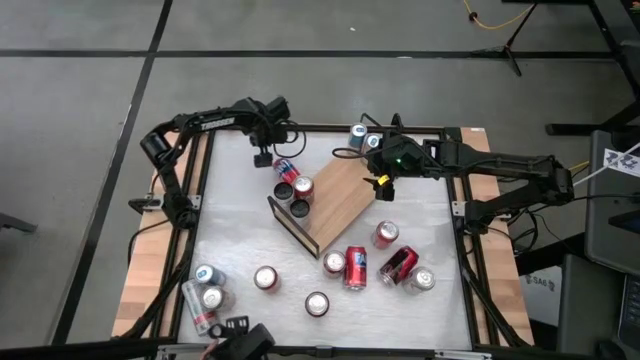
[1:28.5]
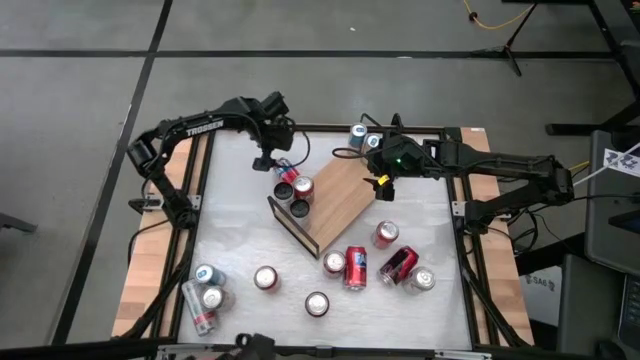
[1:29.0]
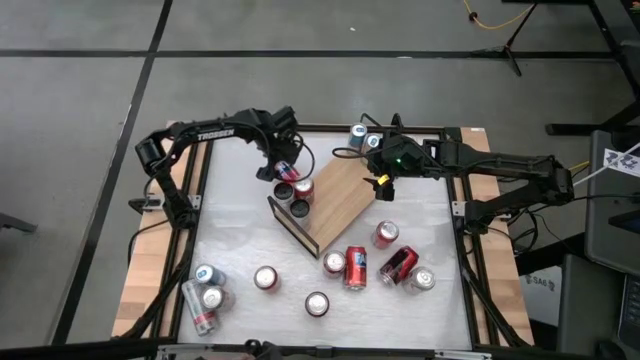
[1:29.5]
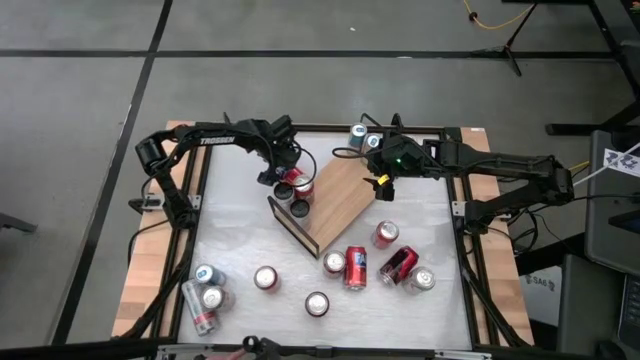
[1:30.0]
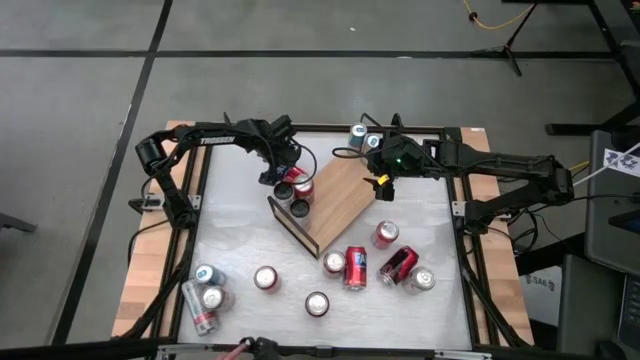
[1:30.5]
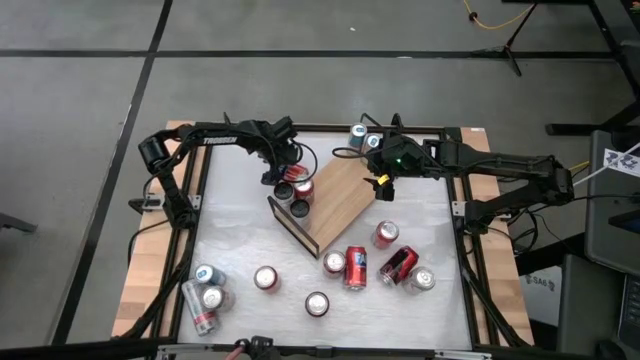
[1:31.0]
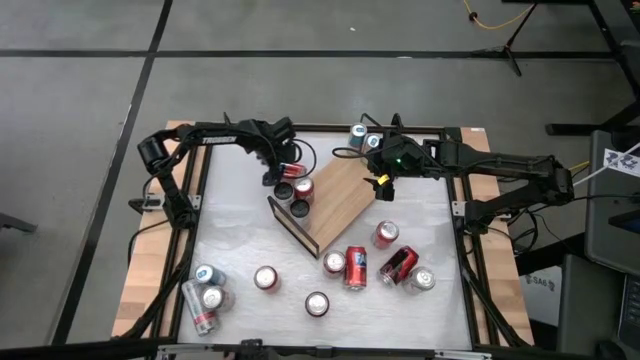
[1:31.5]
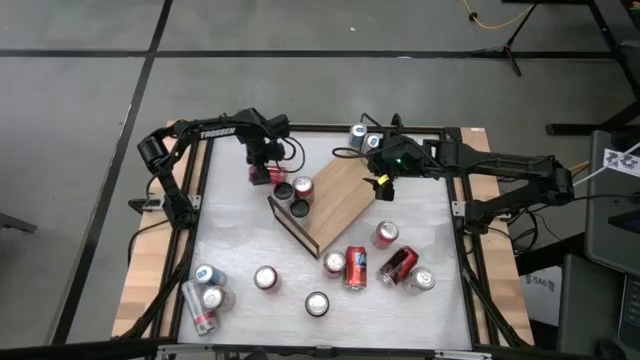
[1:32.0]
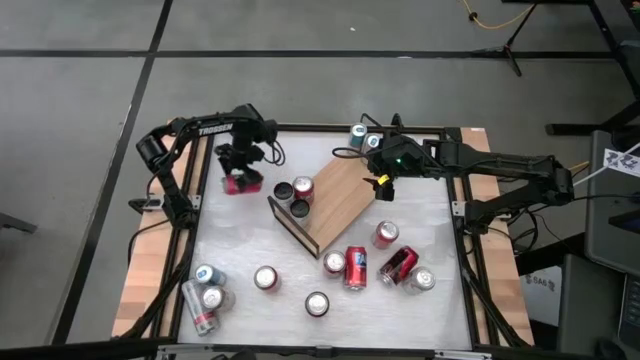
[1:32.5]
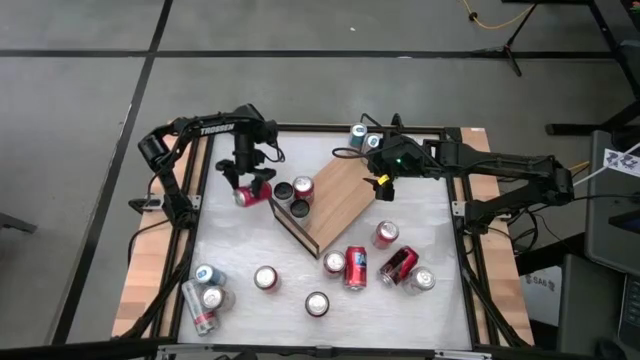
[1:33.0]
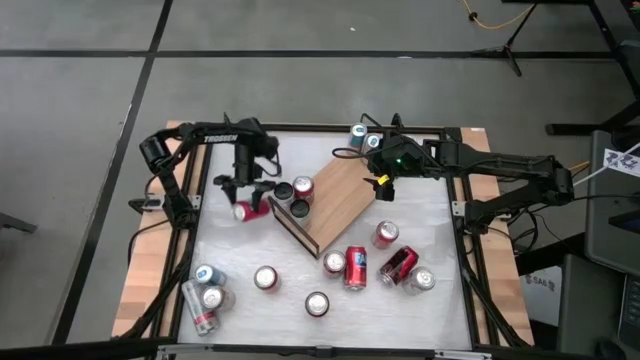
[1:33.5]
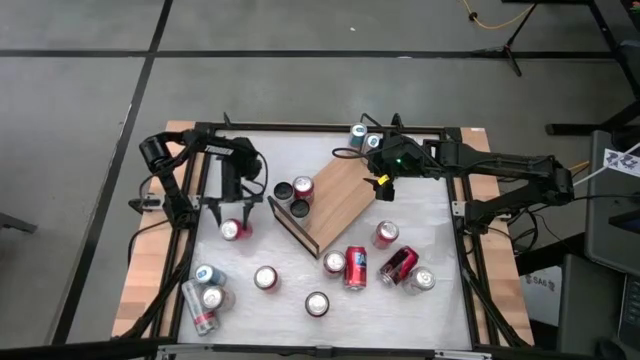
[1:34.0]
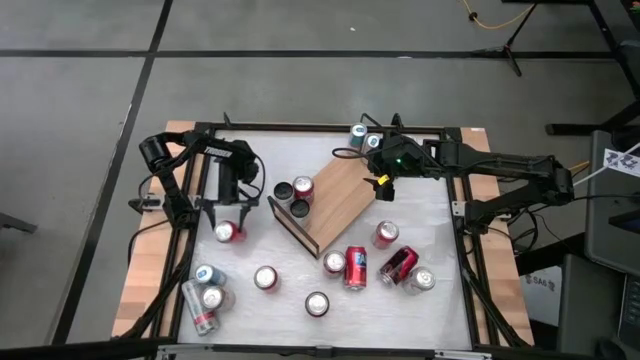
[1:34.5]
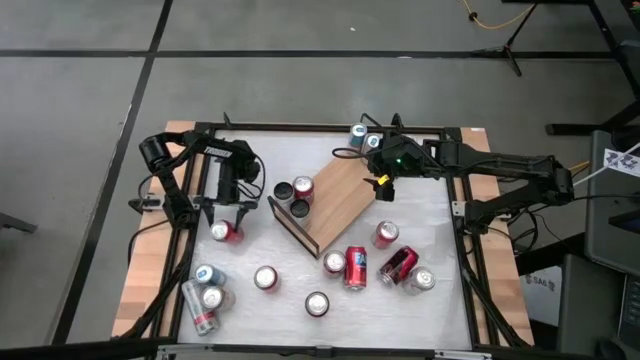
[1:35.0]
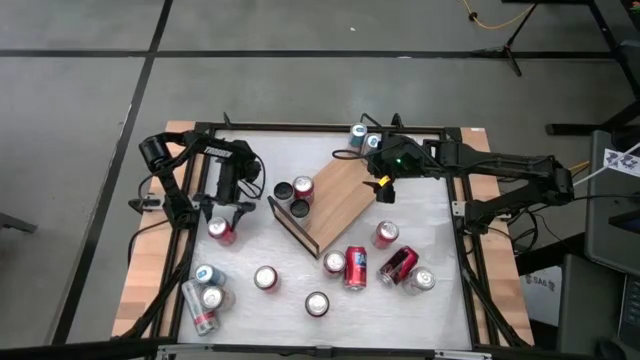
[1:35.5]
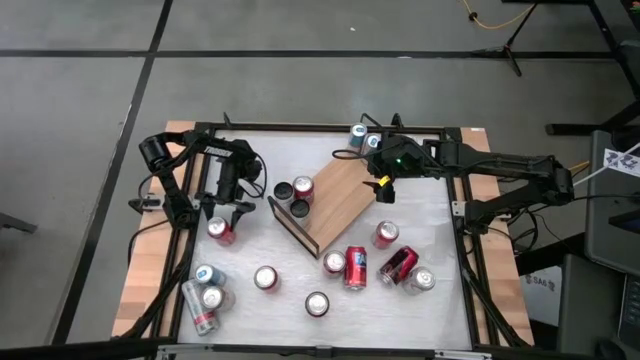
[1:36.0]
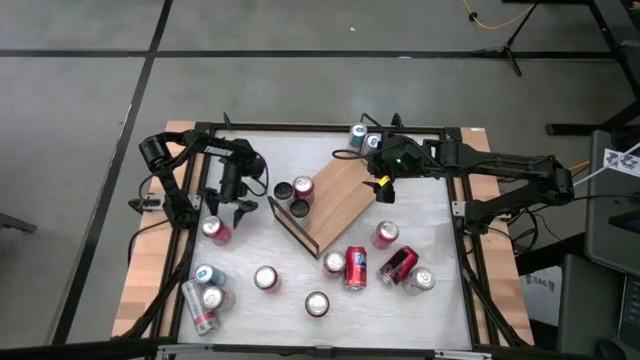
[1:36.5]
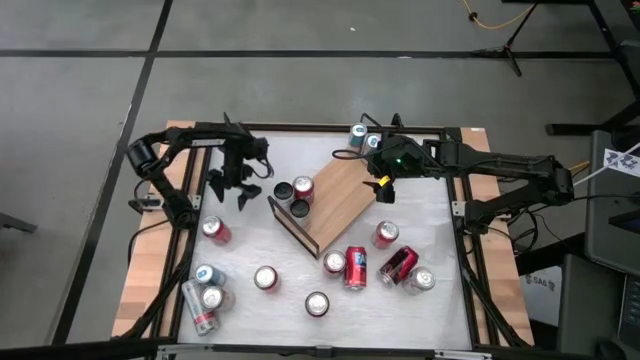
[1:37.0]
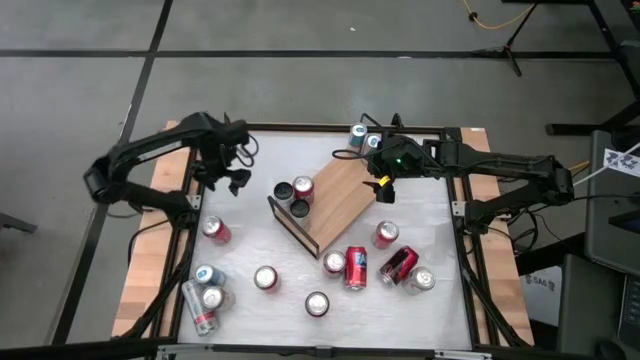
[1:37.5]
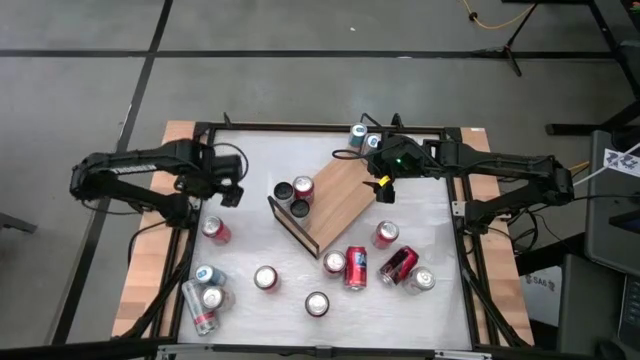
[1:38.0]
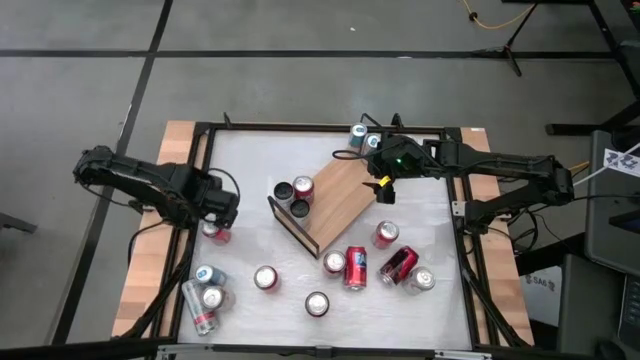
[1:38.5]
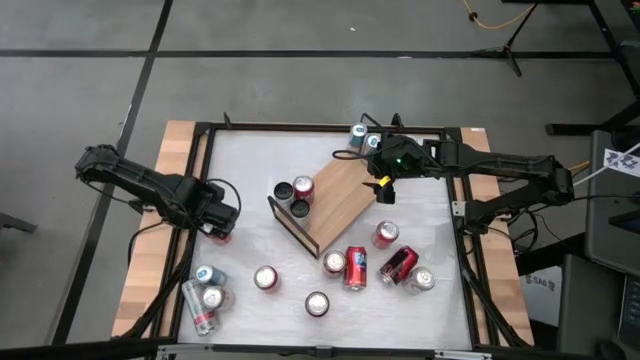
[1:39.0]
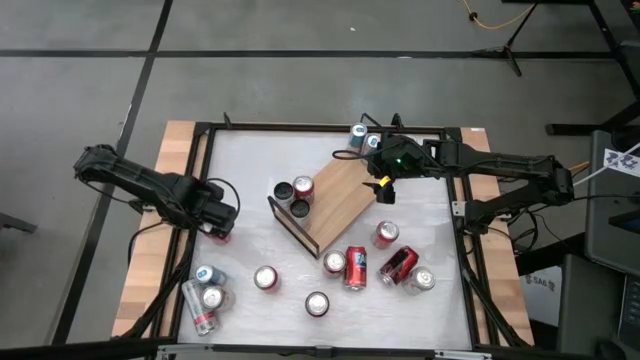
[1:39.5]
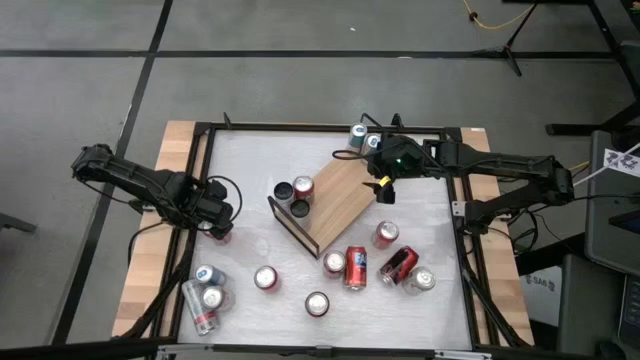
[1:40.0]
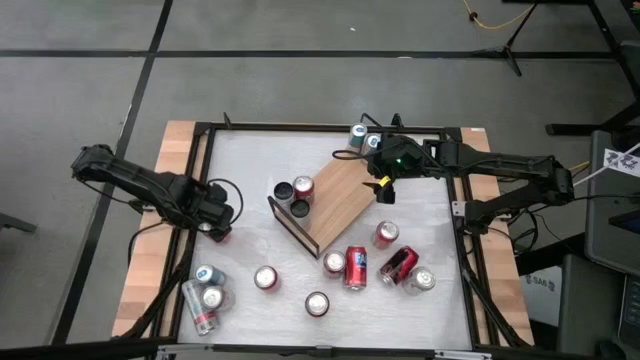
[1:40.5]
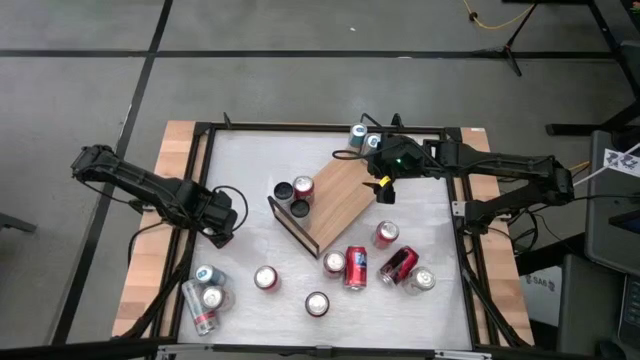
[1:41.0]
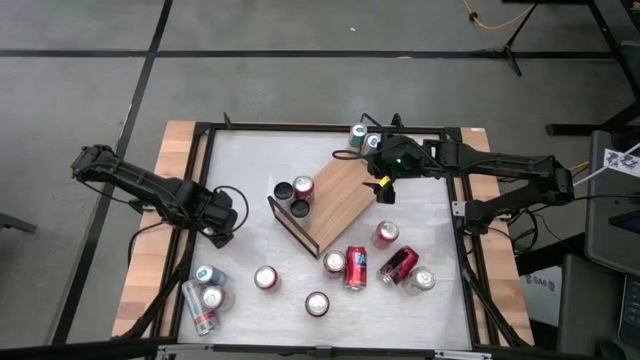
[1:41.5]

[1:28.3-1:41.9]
Task: Place canned beverage on shelf
Put the orange soda can on the shelf

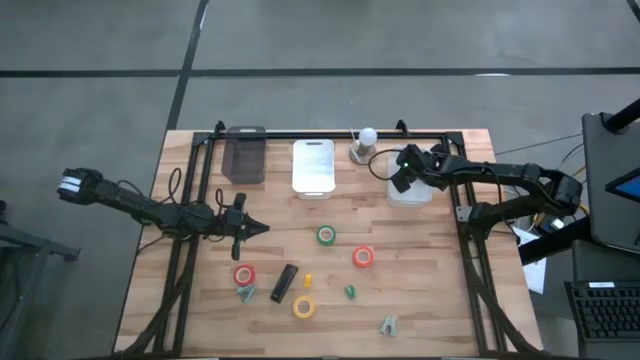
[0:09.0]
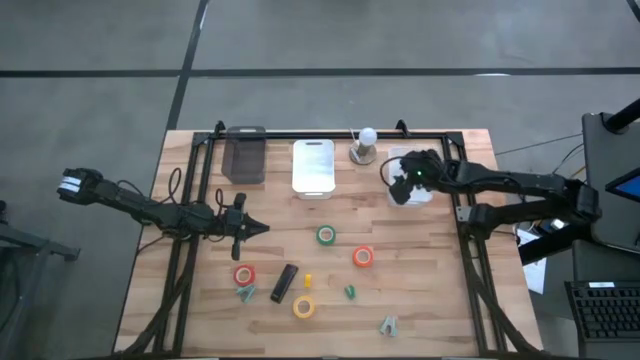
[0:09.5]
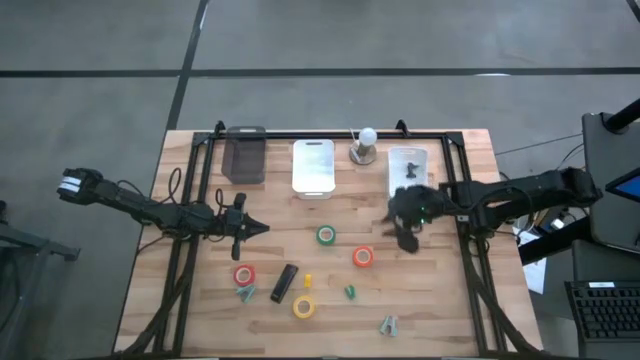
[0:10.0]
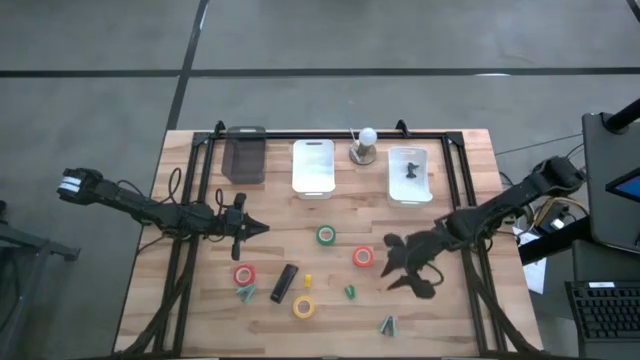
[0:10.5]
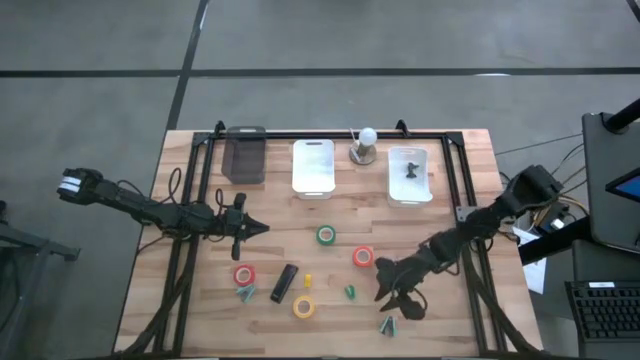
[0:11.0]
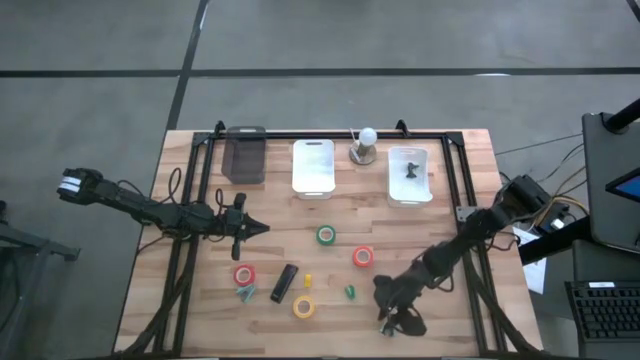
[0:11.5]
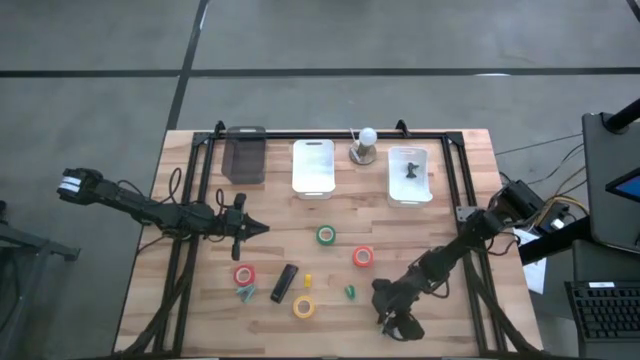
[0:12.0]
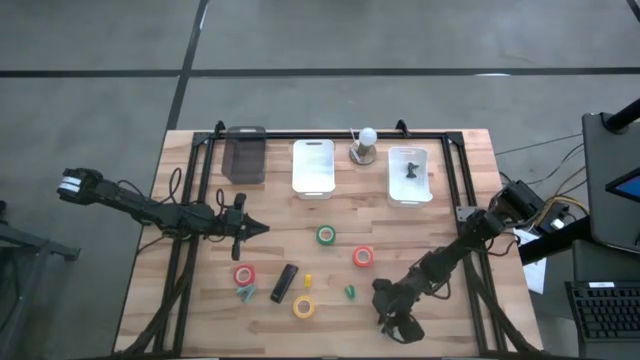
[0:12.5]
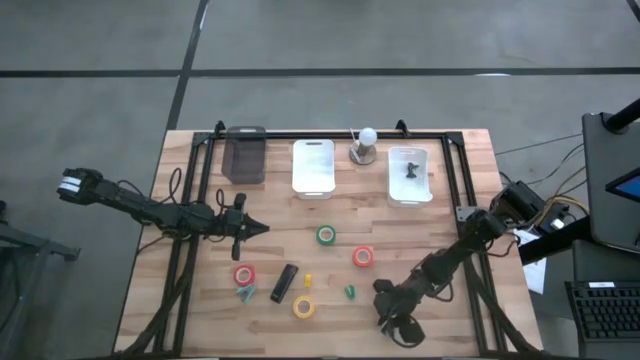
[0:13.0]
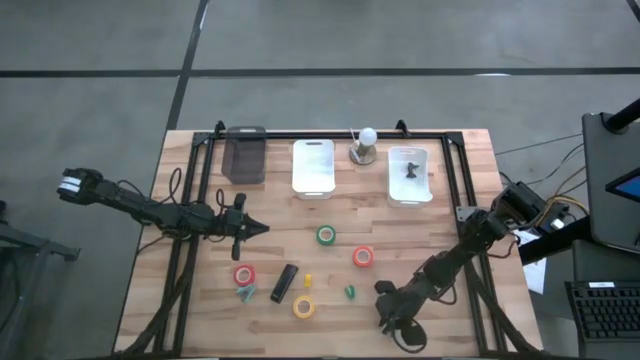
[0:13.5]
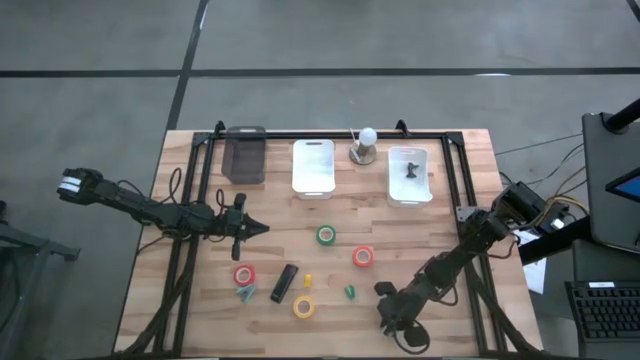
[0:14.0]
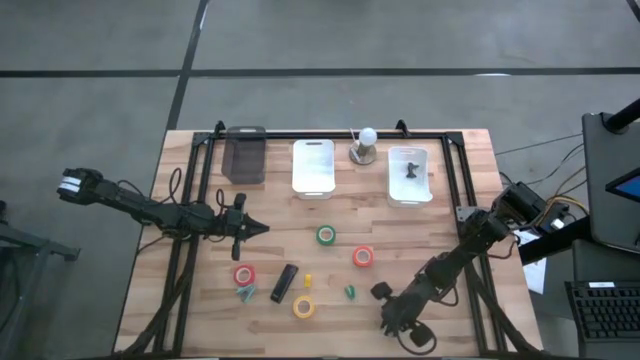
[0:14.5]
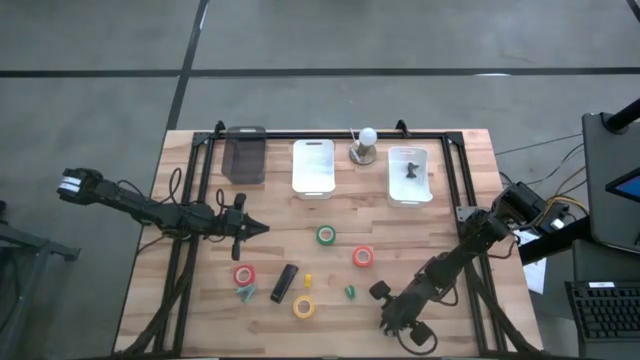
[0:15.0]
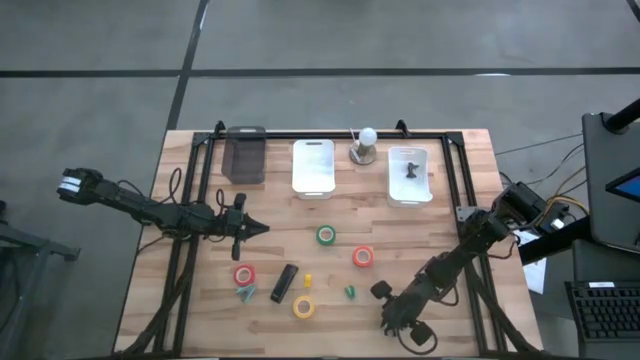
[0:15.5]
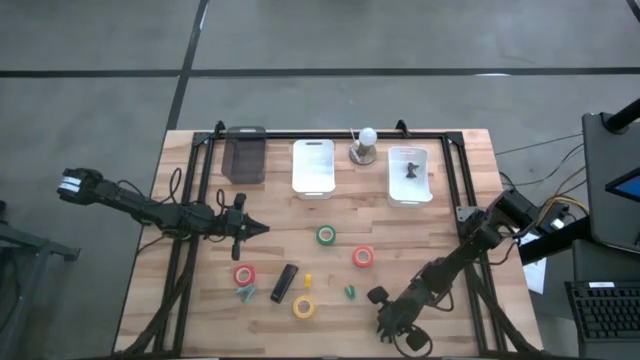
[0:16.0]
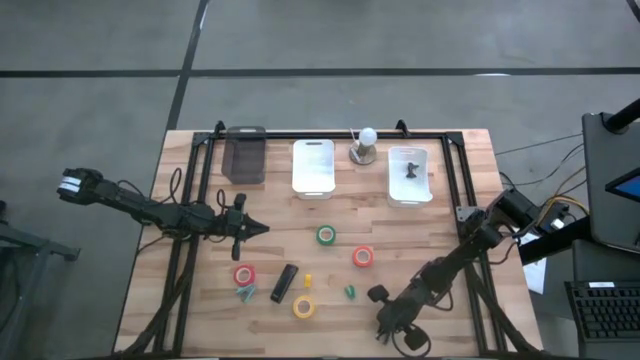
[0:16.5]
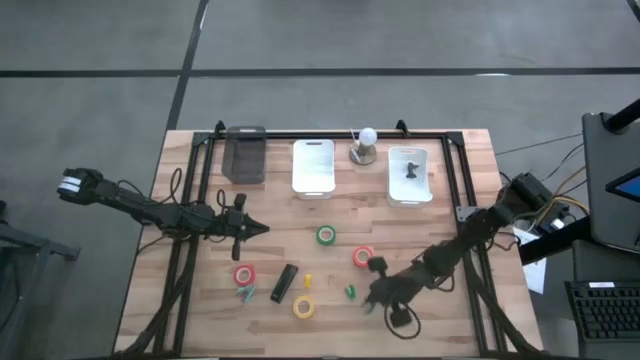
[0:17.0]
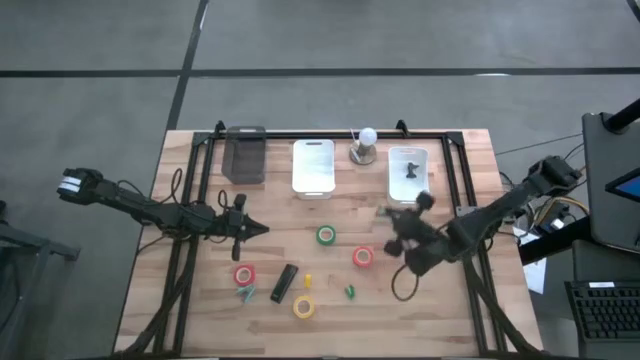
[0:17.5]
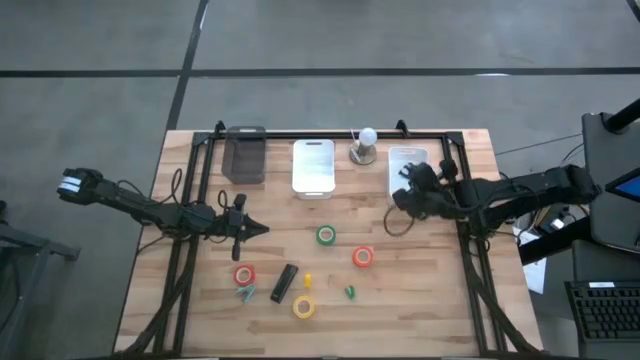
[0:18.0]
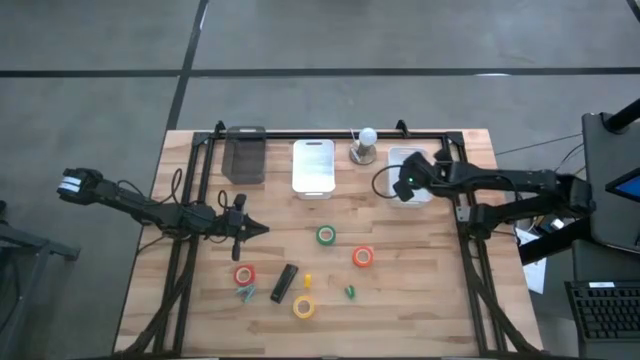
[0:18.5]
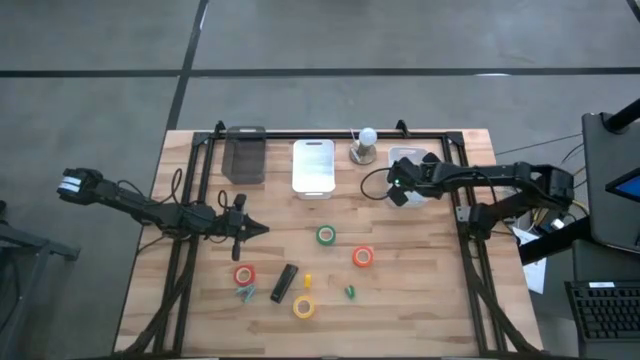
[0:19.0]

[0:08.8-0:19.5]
Task: Pick and place Stapler, Stapler remover, tape
Put the bottom light blue staple remover into the right white bin
